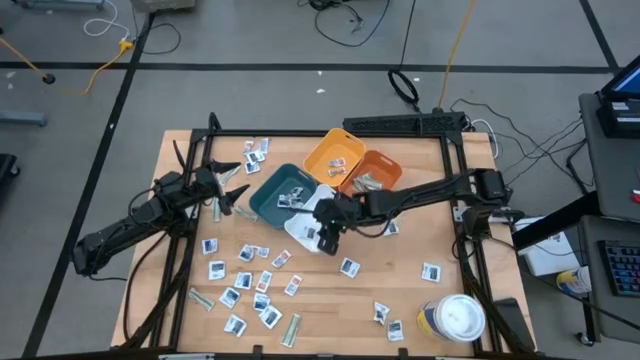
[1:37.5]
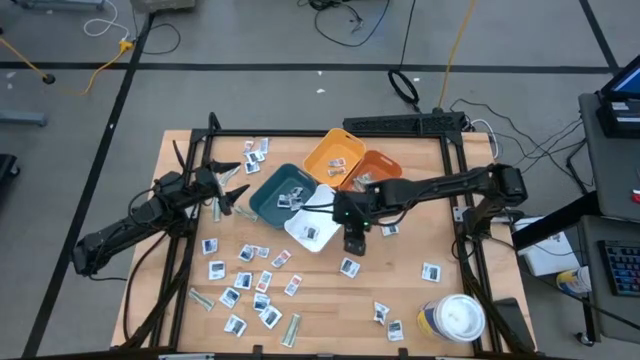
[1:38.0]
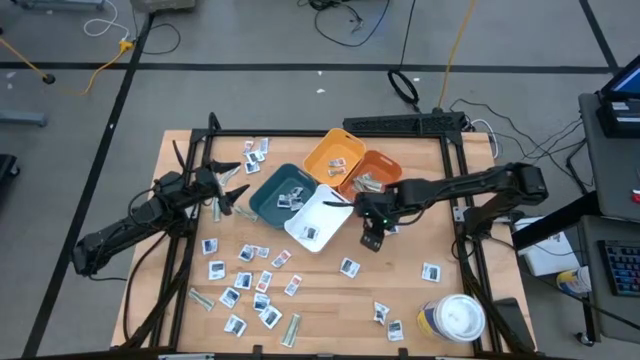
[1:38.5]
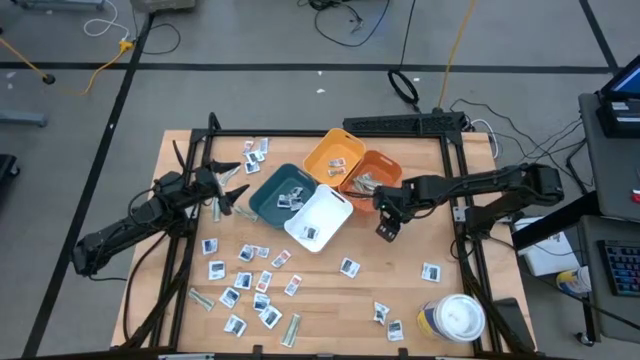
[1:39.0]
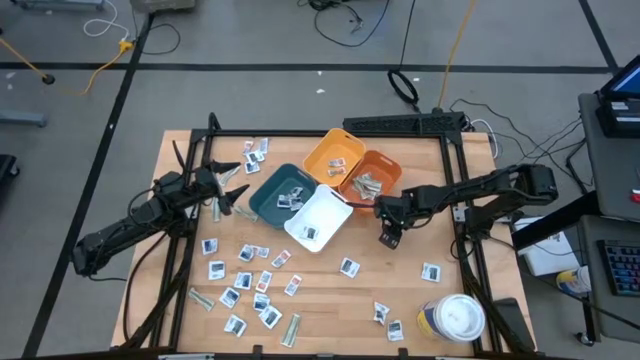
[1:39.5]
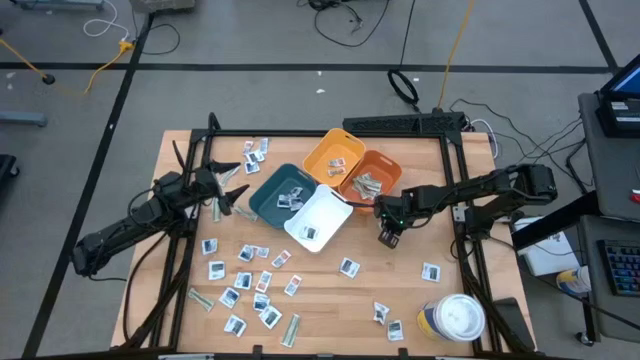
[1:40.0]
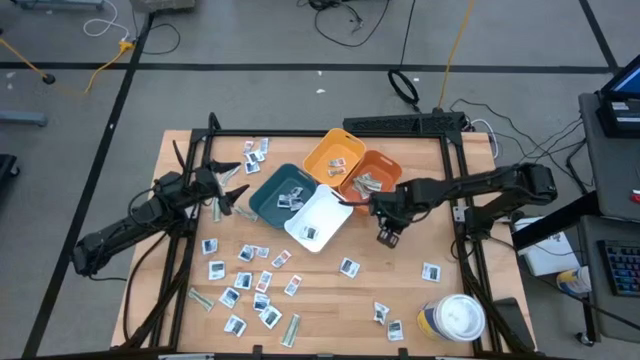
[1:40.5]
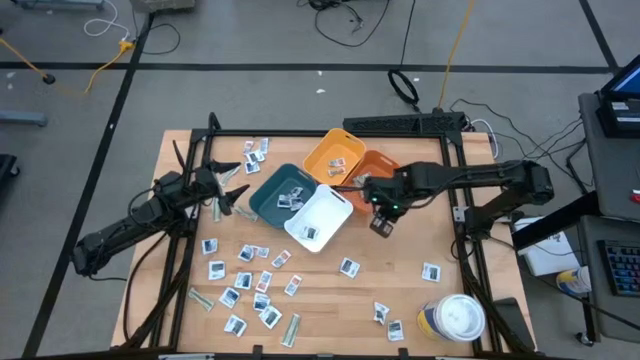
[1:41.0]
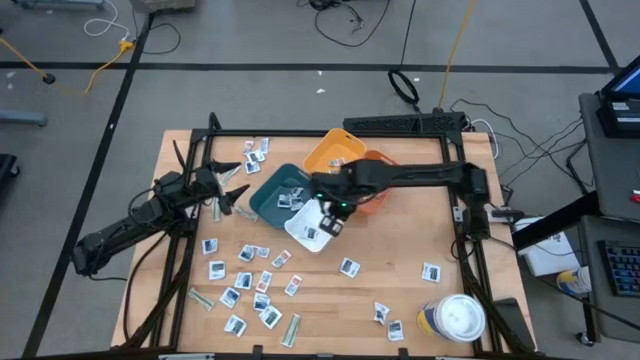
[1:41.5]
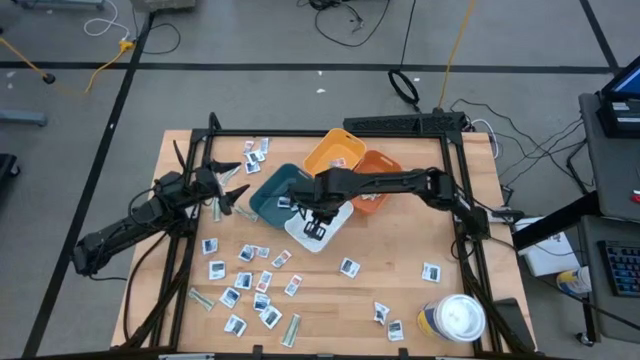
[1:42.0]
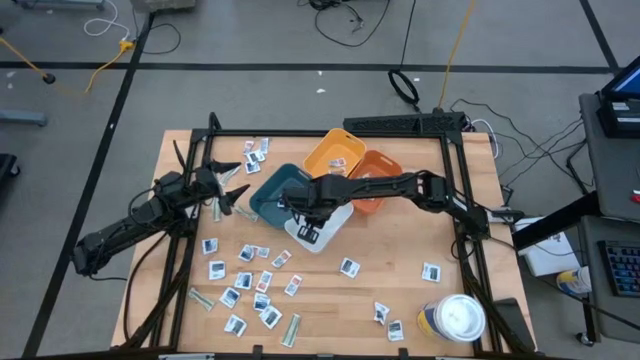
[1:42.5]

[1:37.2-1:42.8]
Task: Pick & Place First Aid Supplies
Put the black towelette pack into the white bin

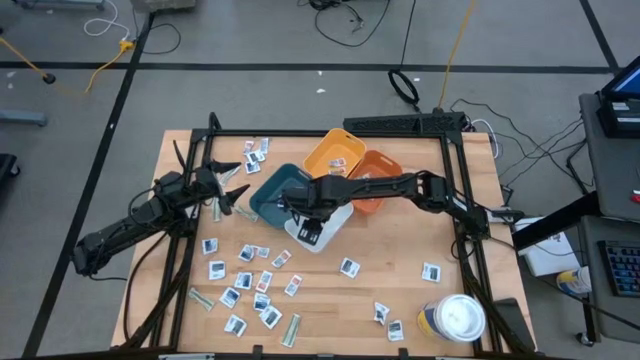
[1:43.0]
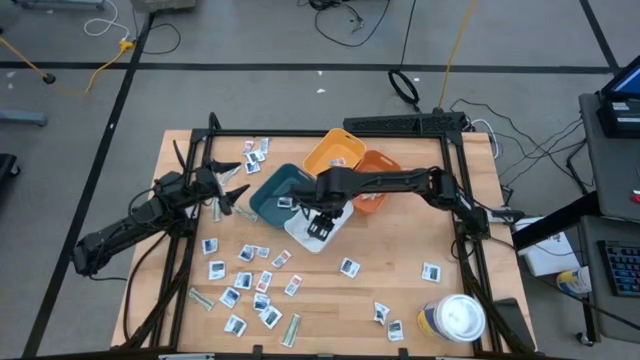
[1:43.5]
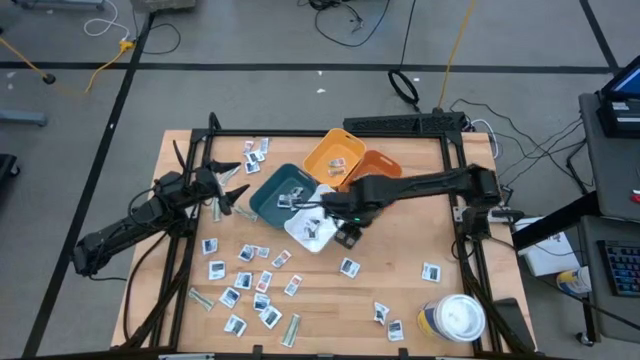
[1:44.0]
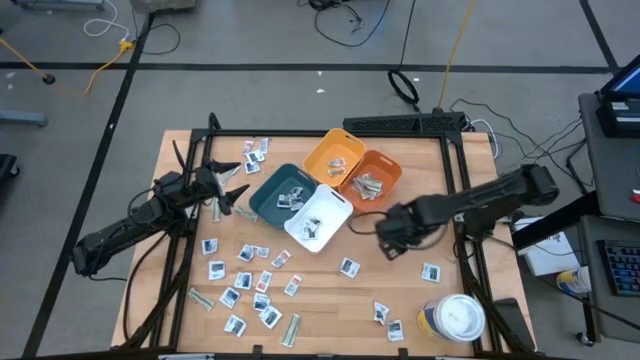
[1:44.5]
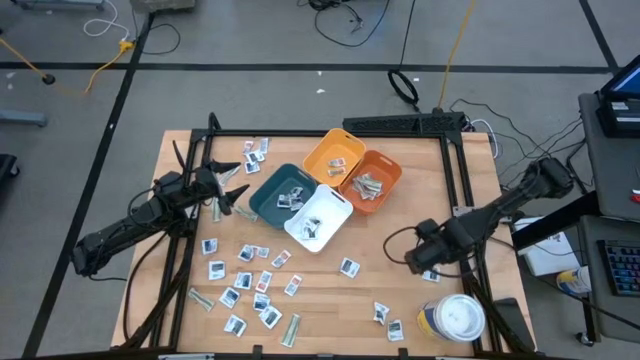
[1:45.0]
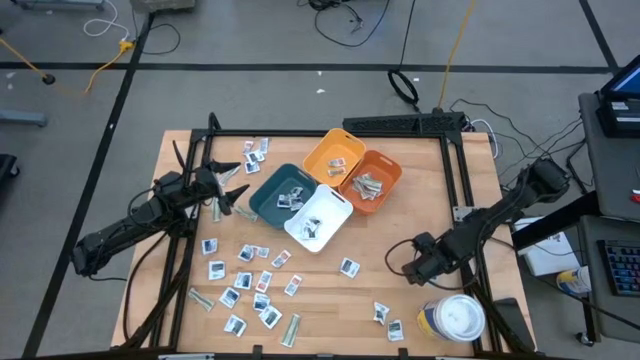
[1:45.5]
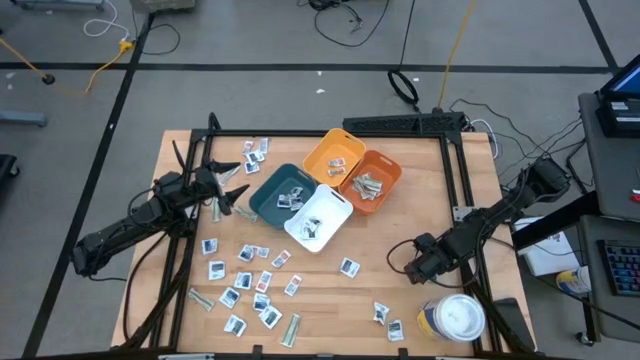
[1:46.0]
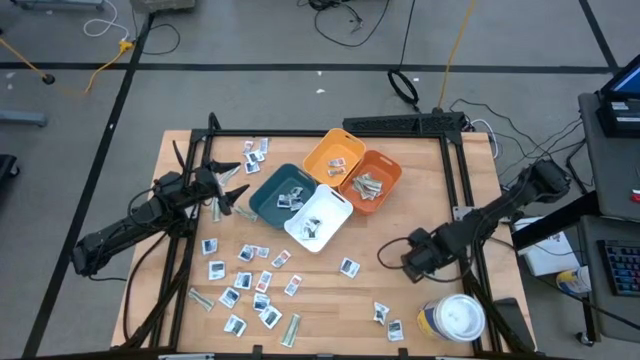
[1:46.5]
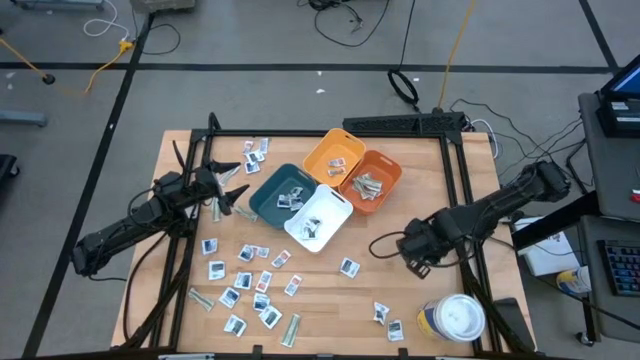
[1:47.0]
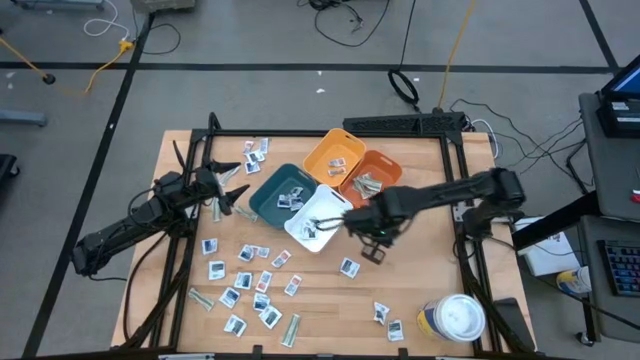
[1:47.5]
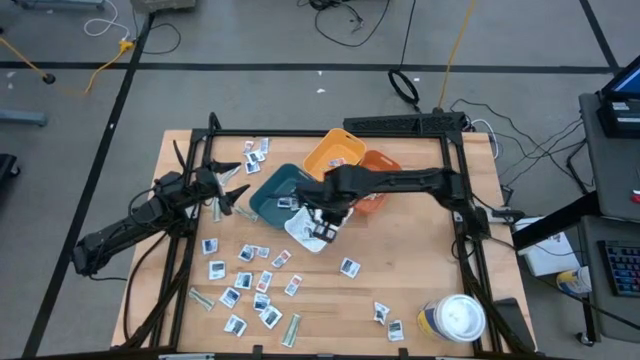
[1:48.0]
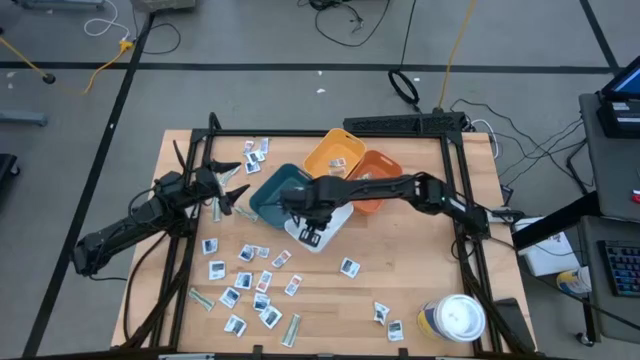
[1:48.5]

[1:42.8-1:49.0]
Put the black towelette pack into the white bin

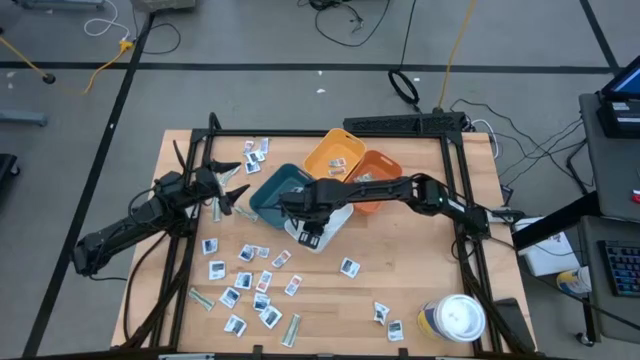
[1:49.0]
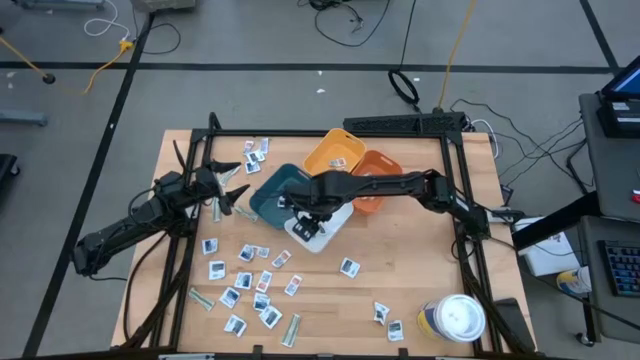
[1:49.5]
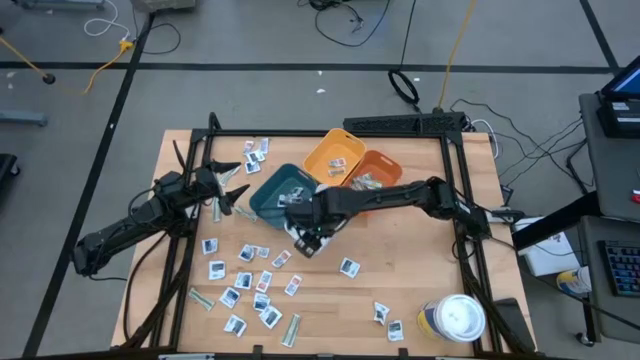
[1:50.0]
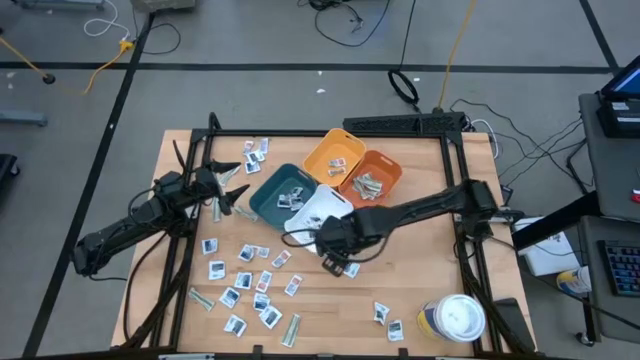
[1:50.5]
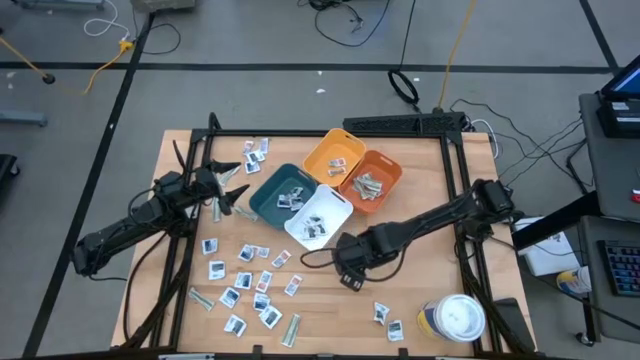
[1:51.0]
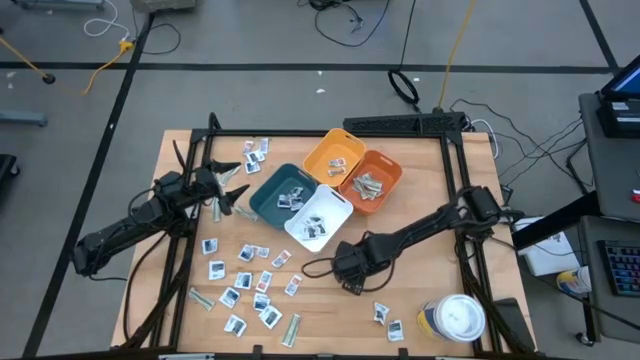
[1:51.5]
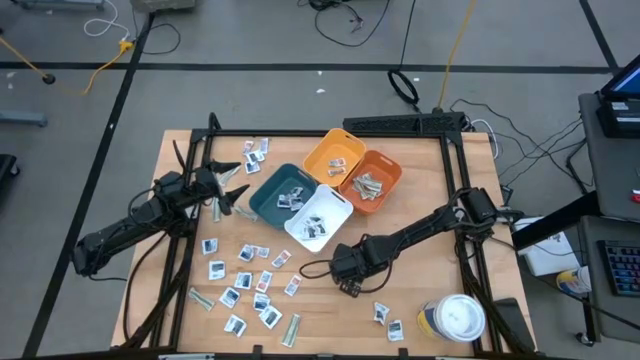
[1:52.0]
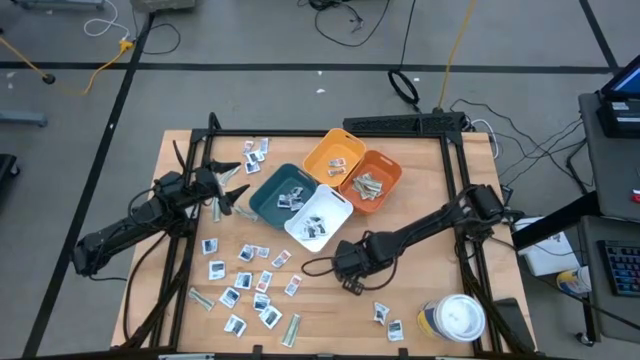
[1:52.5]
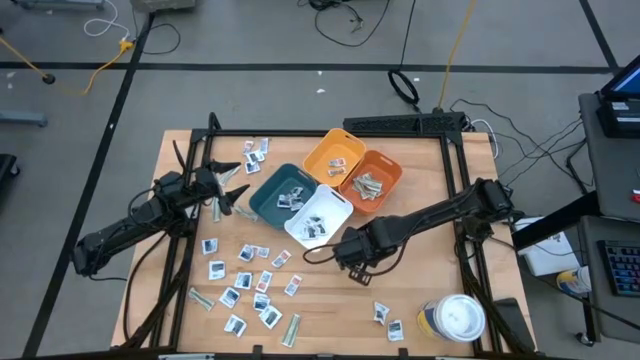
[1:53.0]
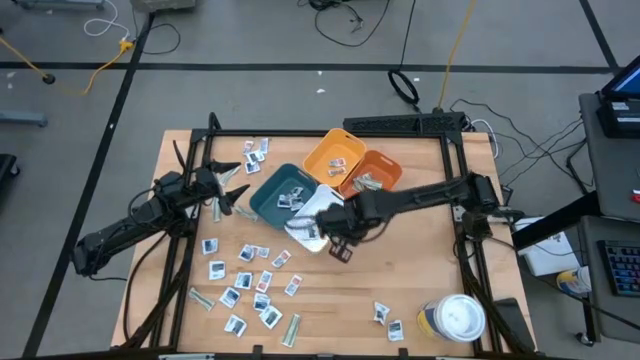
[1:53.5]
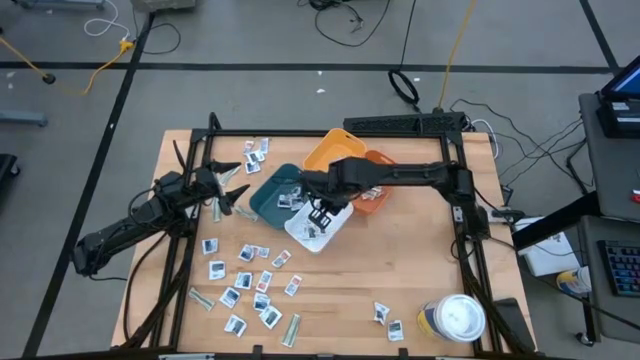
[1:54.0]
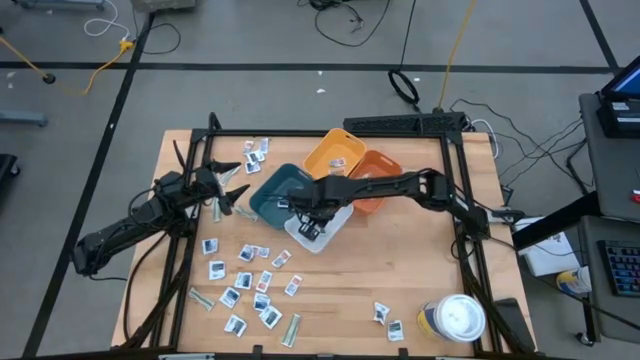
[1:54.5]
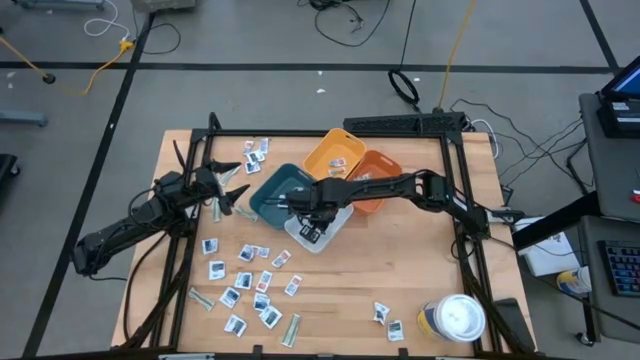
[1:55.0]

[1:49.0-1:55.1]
Put the black towelette pack into the white bin

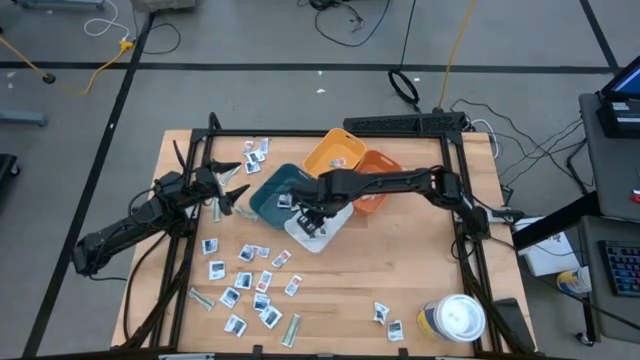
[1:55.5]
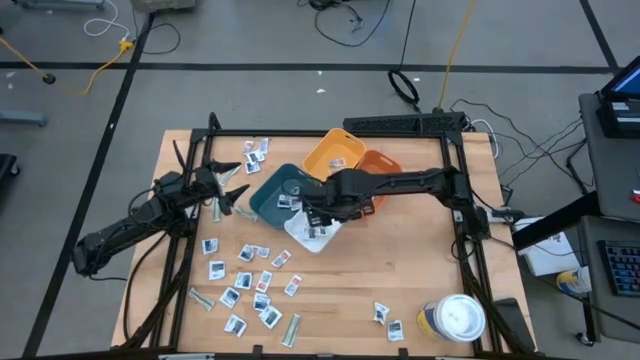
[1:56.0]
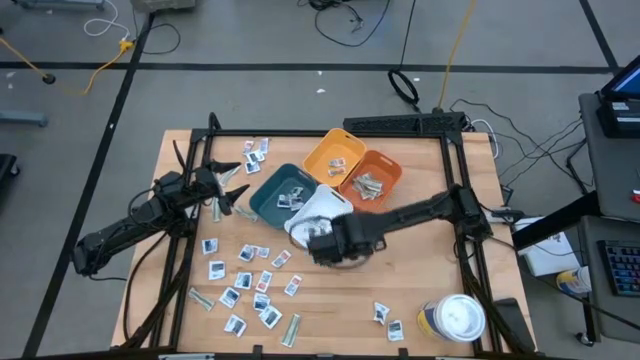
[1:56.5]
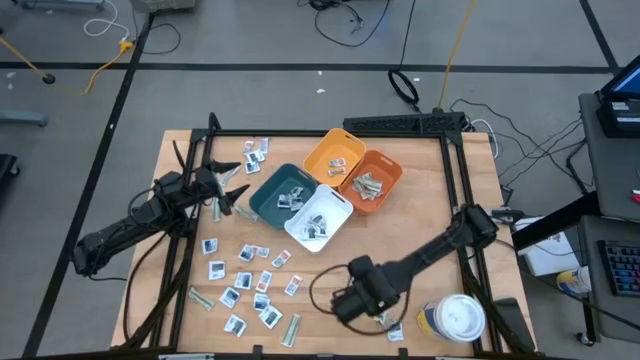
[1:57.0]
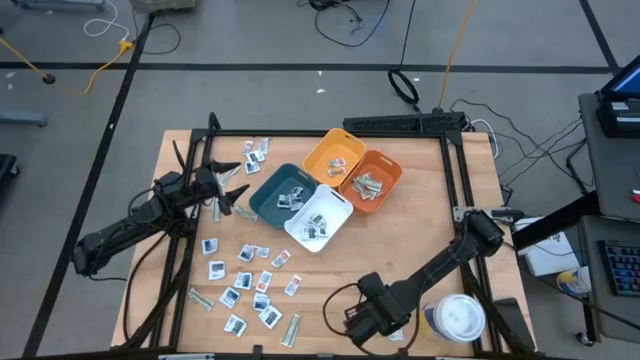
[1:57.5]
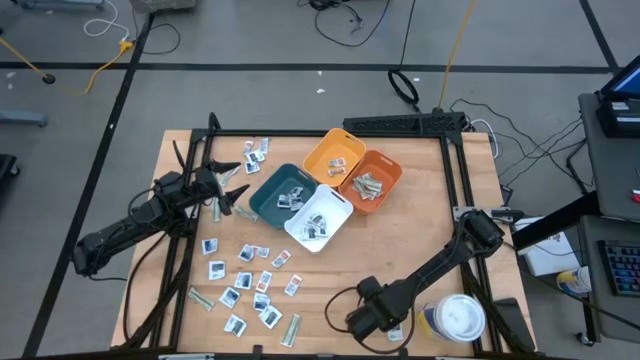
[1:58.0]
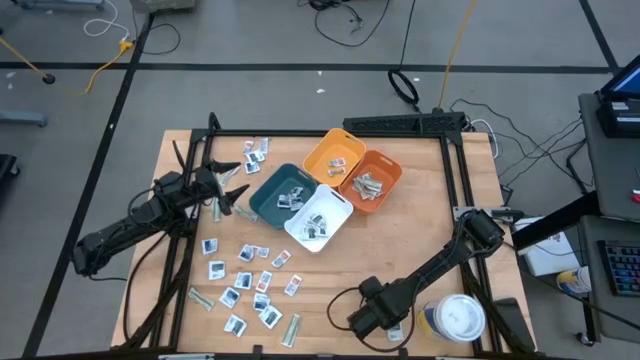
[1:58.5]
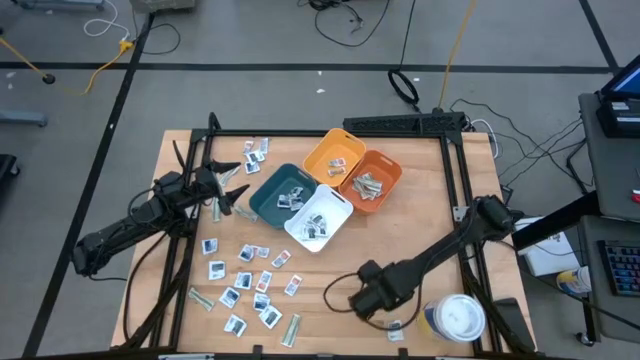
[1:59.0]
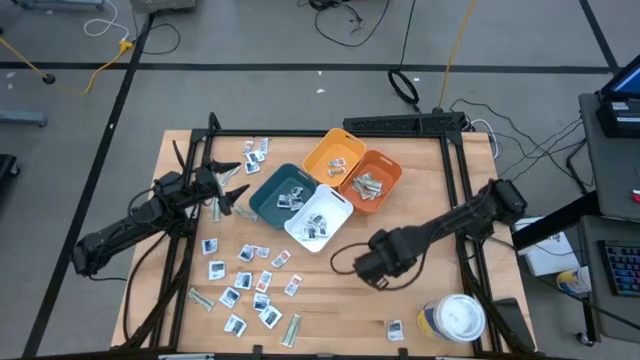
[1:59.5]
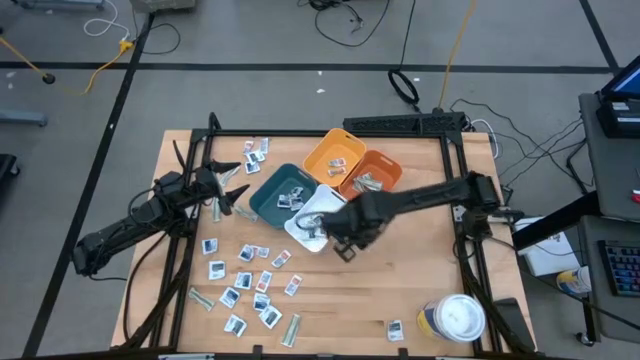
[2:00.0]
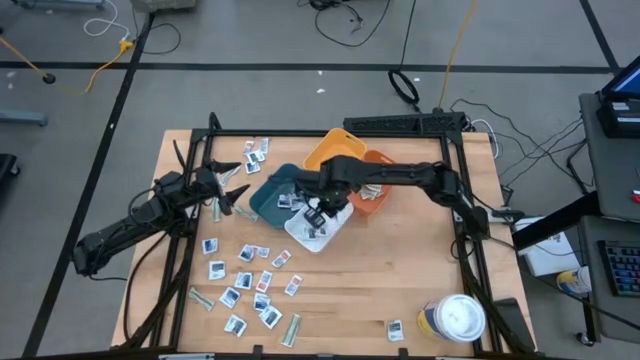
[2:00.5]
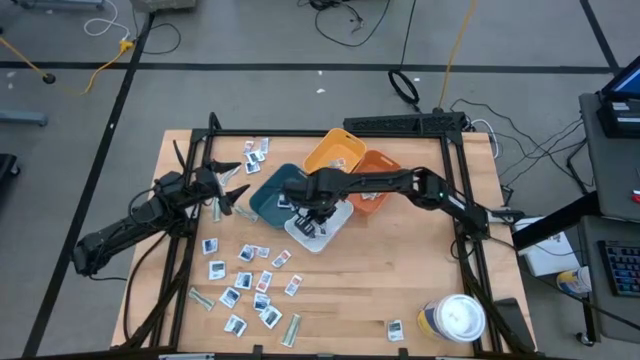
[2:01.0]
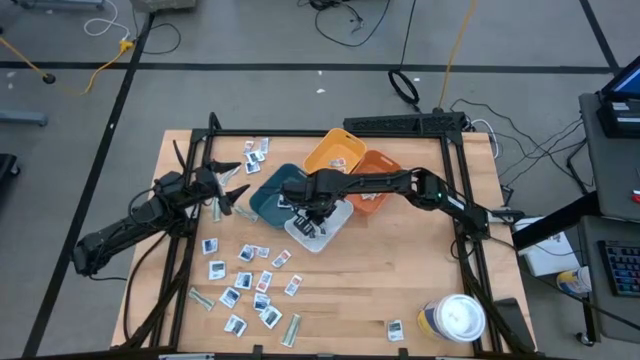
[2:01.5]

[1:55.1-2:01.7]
Put the black towelette pack into the white bin
